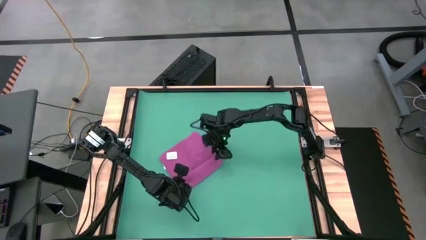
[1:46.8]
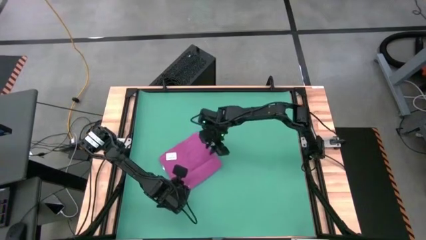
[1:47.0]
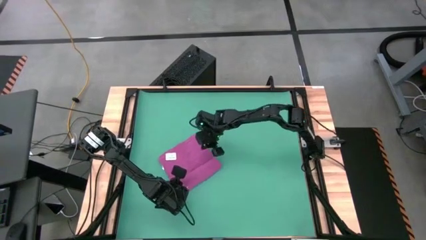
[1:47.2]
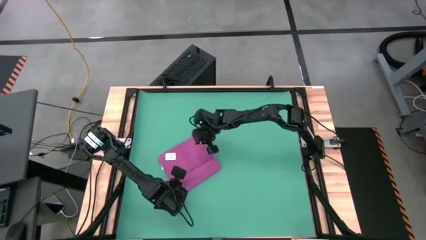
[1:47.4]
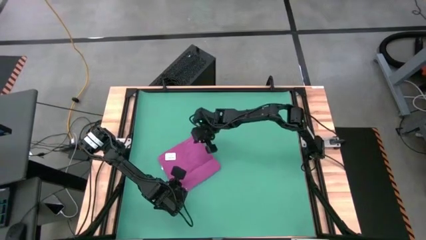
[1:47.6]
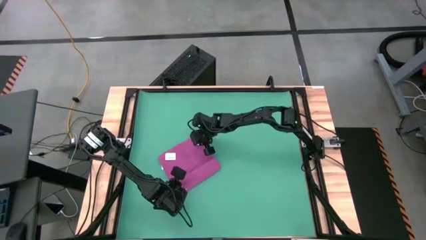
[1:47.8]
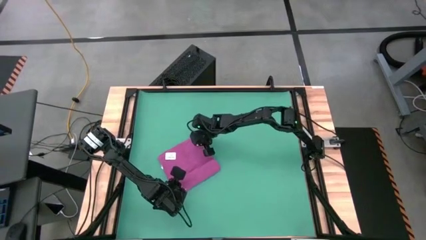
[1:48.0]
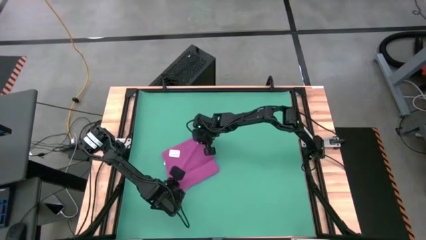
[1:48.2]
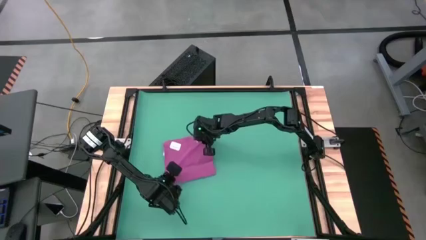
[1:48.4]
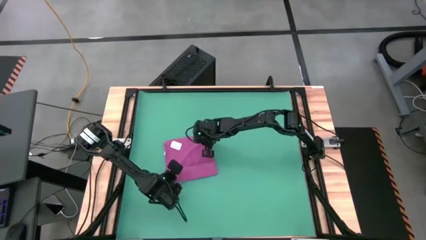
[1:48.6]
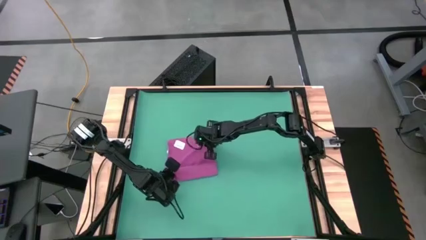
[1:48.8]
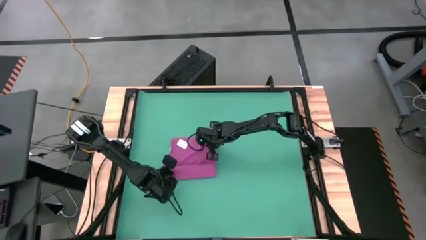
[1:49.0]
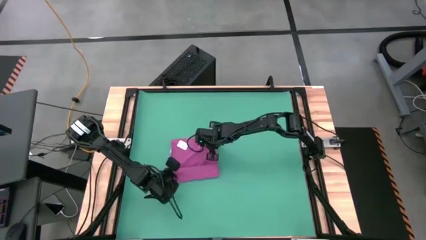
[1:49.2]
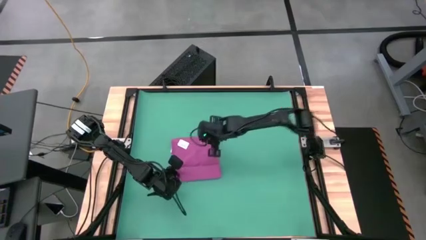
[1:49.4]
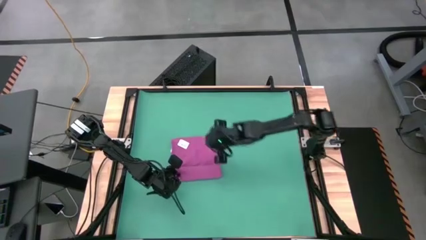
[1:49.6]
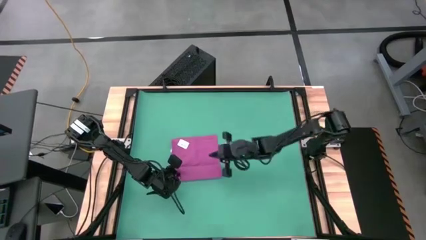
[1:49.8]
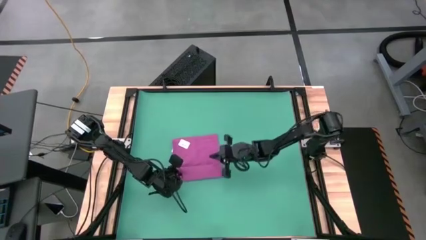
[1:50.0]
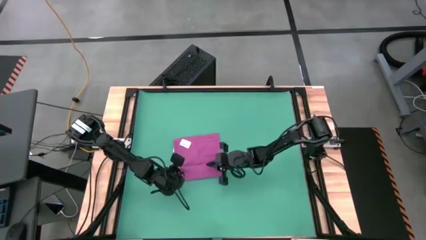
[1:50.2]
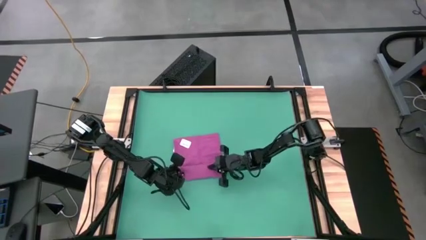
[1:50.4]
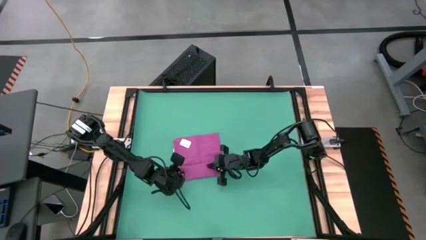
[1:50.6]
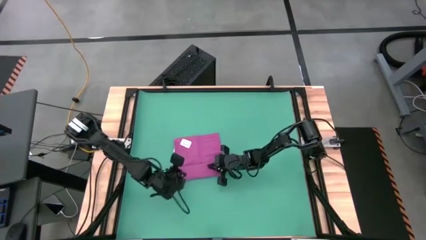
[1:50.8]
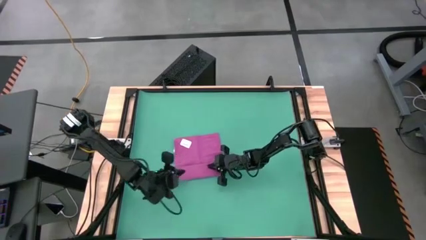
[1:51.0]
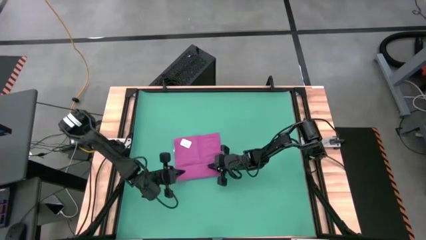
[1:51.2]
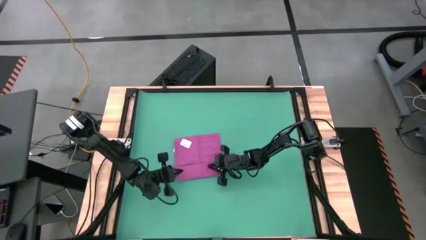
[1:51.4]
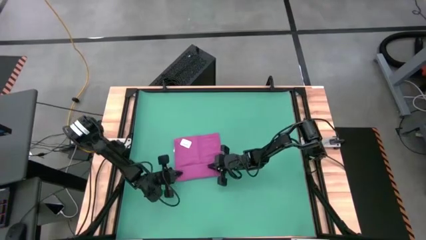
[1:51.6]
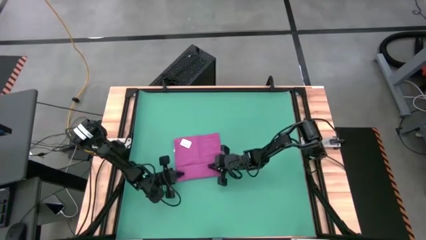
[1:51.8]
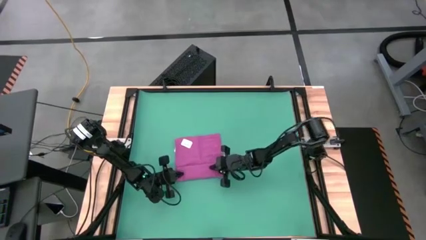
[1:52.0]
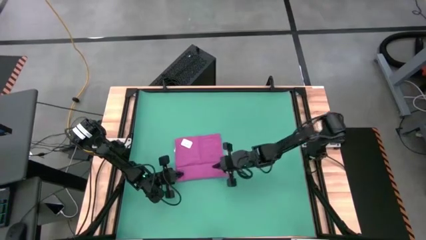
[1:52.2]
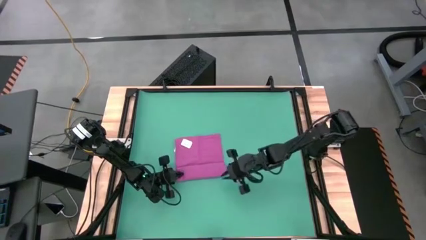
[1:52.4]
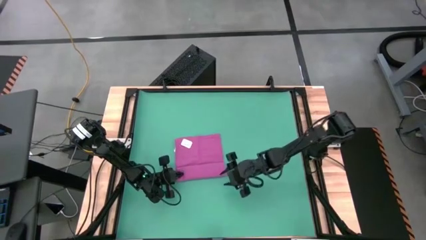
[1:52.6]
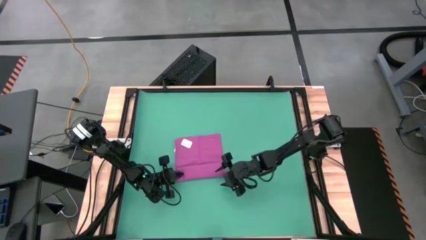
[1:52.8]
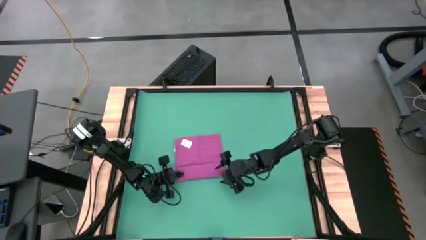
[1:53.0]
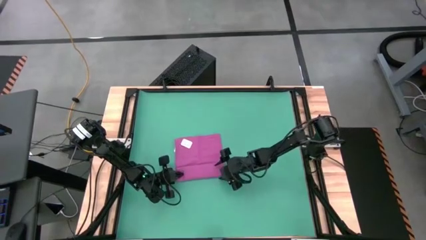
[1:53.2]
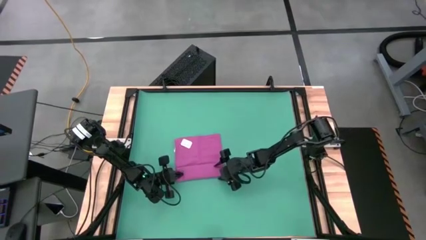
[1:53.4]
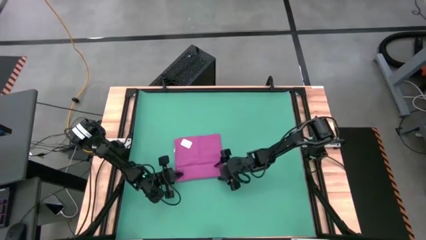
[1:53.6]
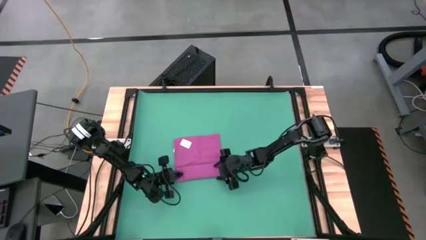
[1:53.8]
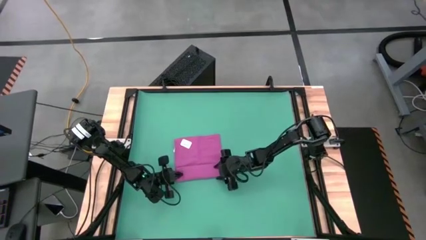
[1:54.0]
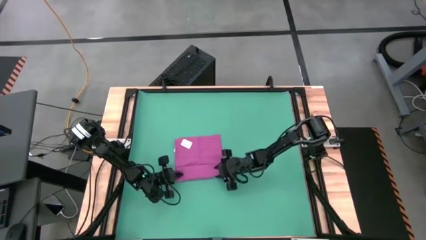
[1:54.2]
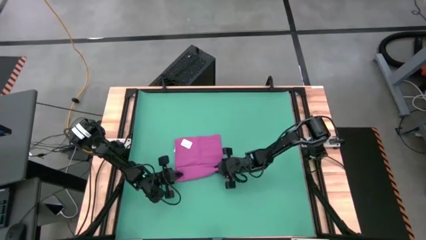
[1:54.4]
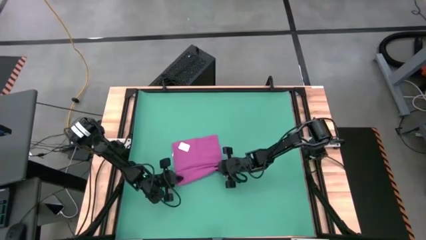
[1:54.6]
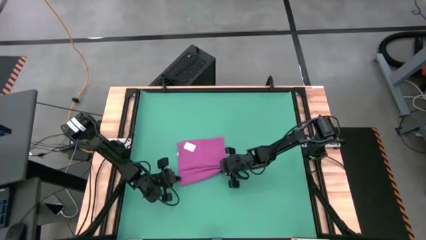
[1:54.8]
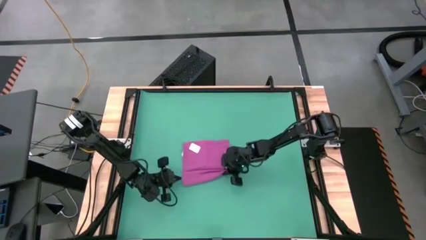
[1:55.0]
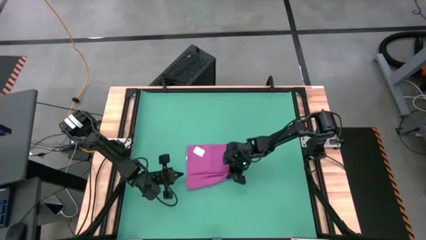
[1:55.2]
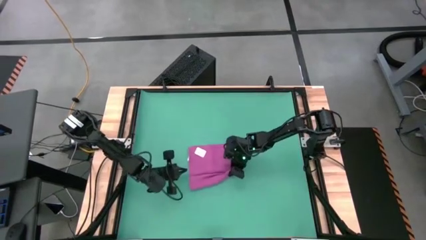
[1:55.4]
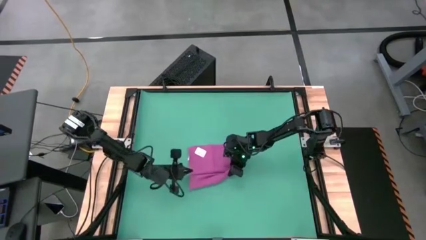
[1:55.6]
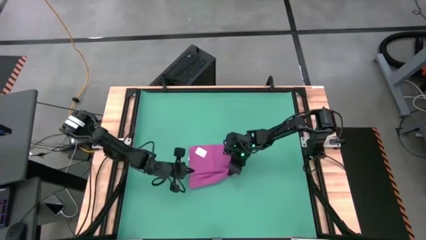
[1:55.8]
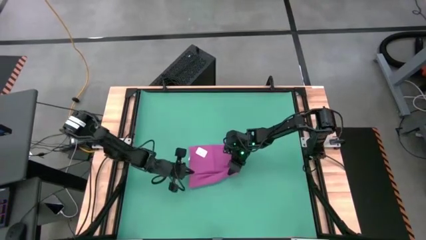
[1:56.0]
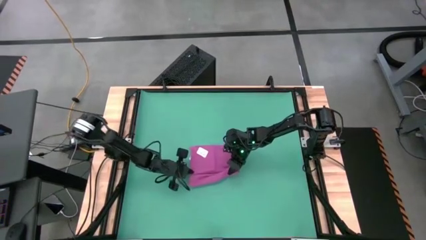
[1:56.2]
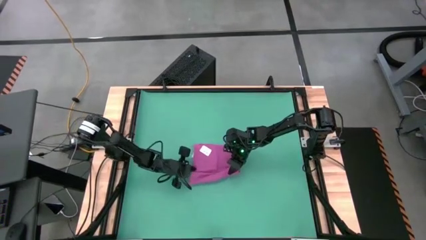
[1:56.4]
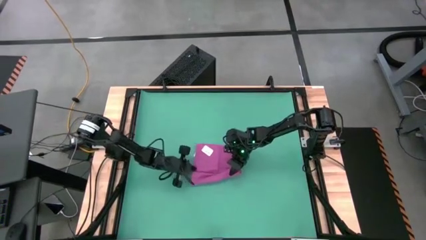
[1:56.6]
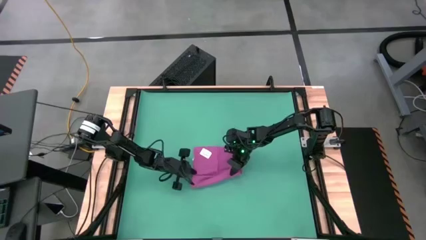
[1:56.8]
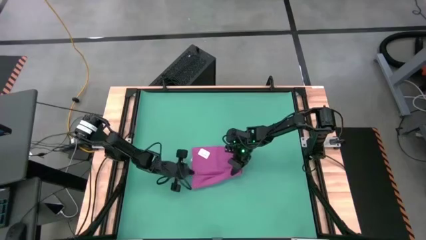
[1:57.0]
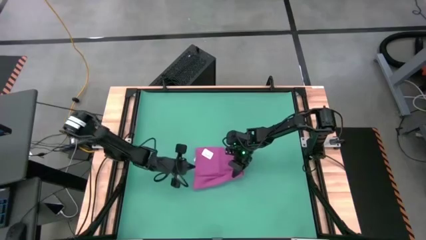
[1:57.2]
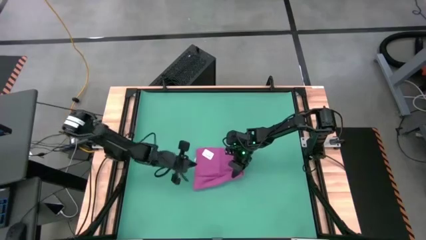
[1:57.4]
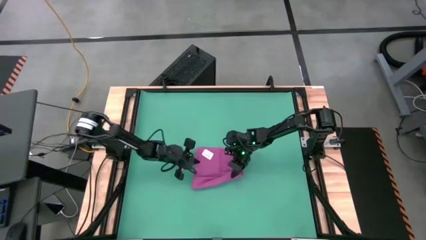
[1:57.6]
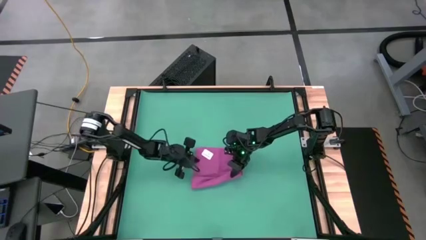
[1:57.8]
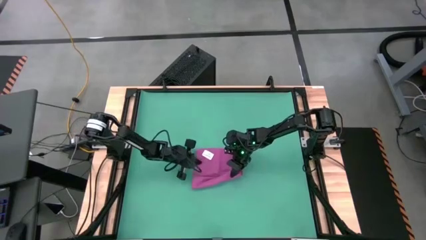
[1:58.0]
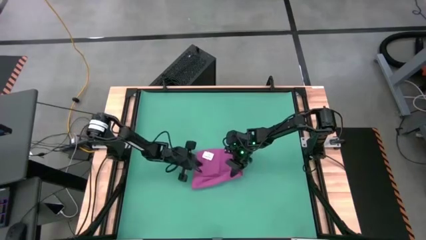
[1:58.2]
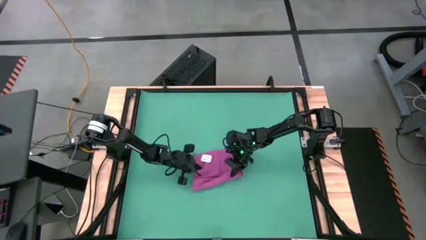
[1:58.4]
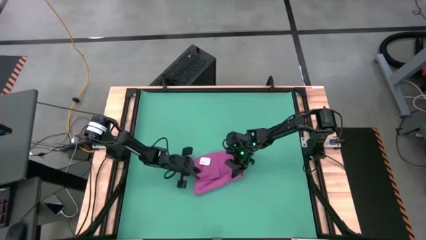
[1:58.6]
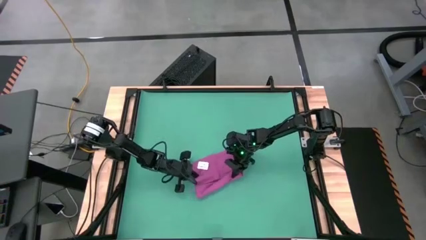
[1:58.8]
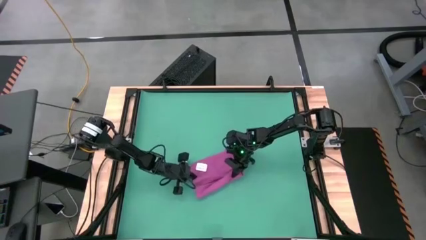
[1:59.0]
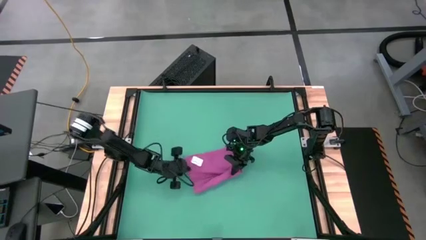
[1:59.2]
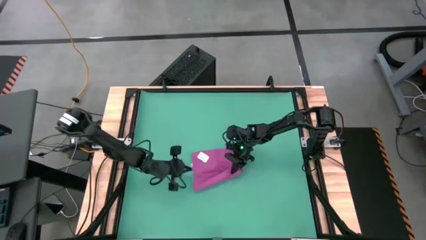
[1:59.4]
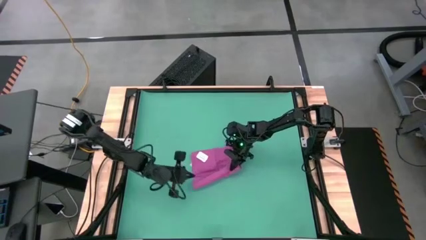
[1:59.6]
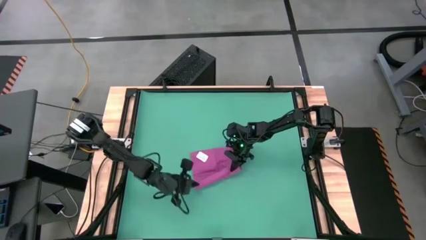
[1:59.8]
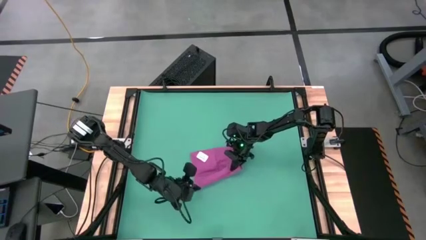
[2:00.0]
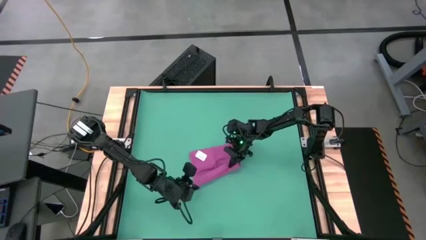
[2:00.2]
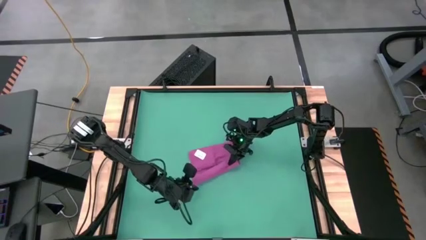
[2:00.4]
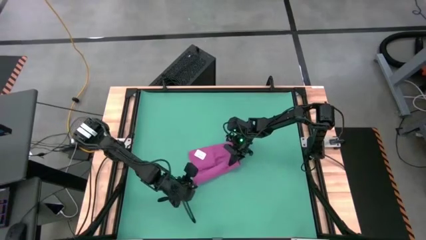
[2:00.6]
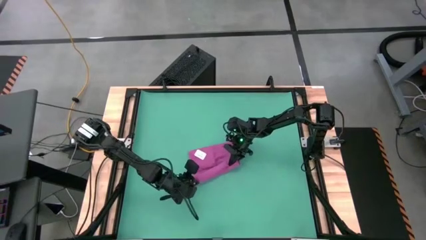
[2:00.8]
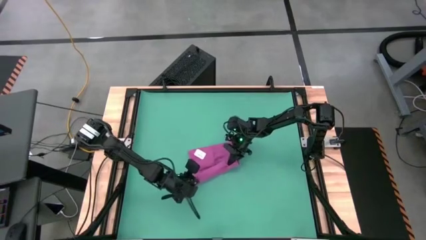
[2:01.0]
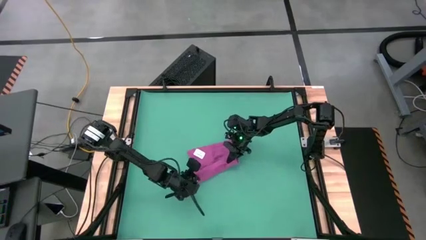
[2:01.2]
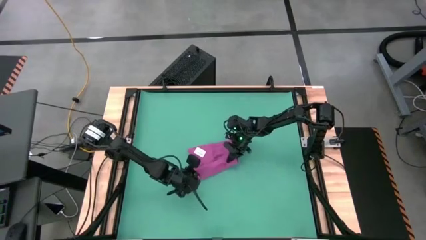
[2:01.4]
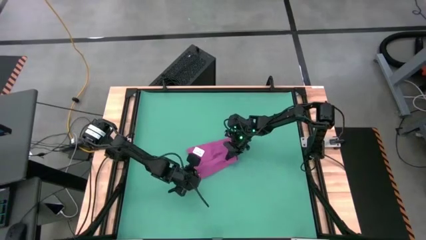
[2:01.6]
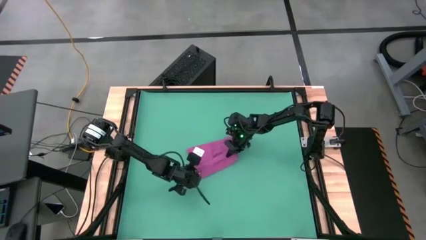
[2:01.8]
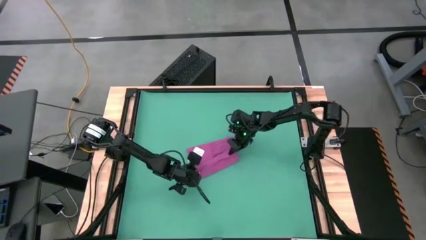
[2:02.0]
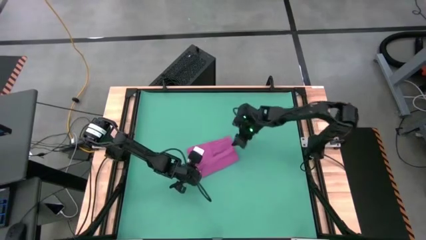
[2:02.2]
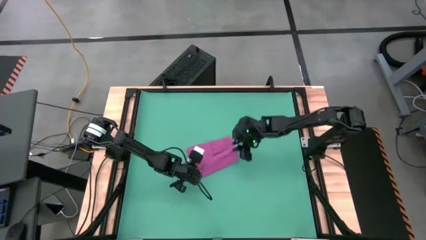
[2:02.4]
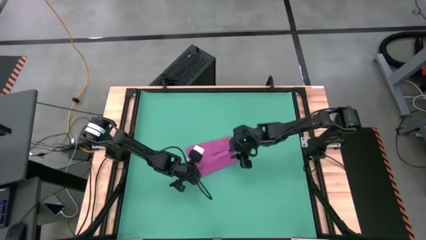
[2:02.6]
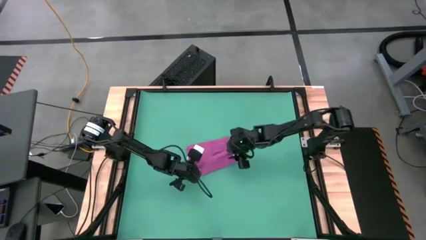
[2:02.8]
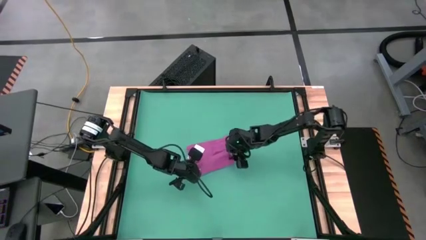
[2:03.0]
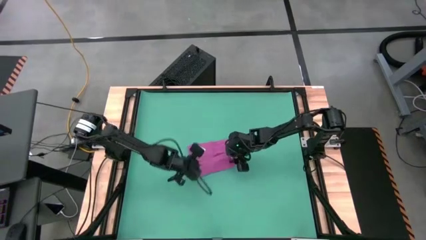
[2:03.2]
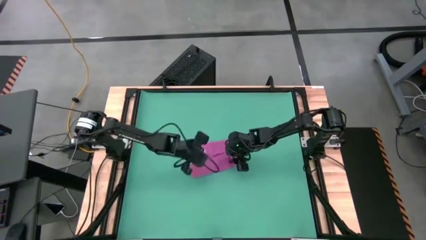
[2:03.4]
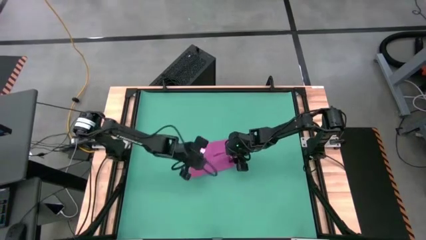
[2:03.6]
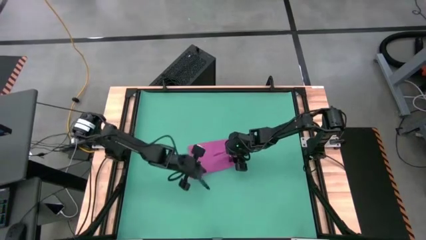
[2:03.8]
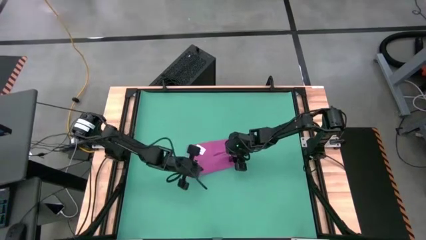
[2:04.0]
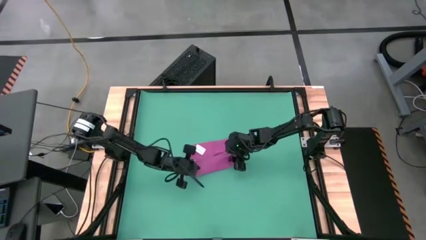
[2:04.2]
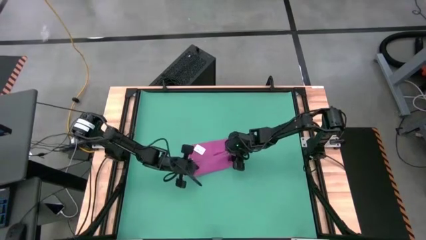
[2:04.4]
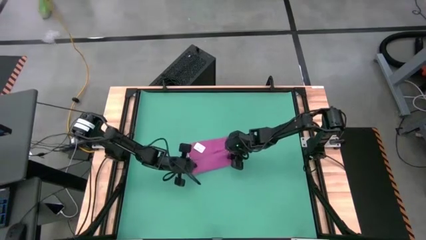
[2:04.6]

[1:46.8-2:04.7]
Task: Roll towel
Roll the violet towel
